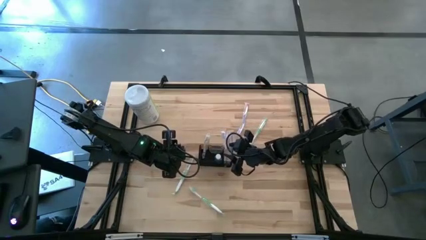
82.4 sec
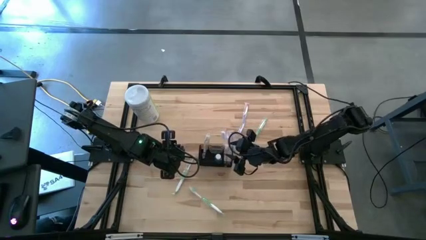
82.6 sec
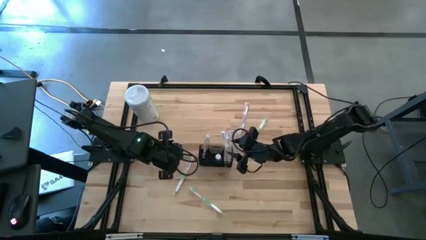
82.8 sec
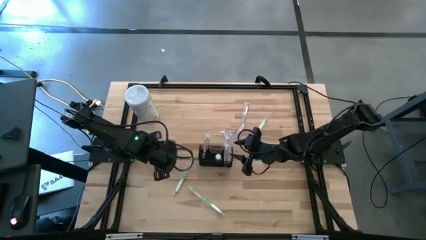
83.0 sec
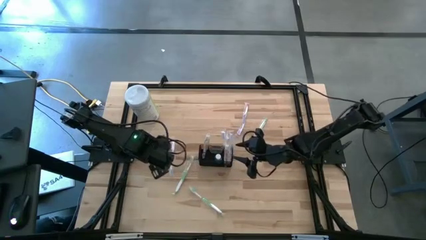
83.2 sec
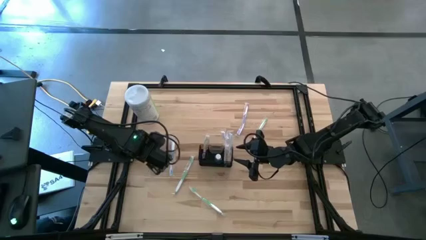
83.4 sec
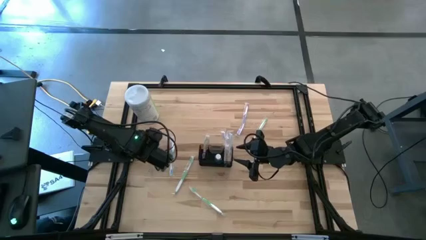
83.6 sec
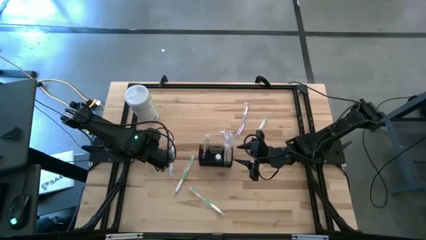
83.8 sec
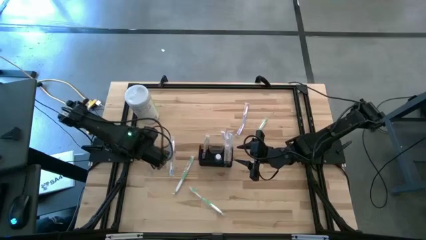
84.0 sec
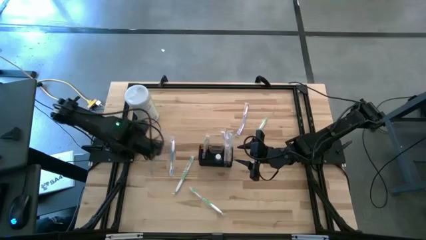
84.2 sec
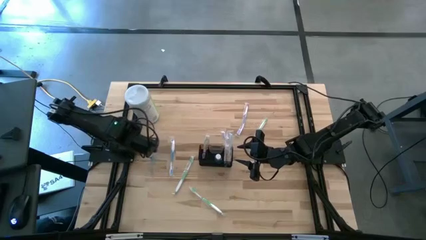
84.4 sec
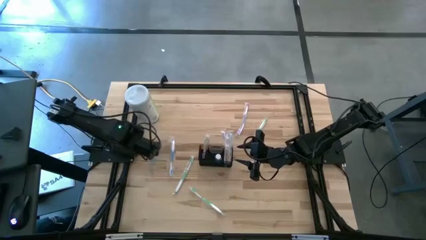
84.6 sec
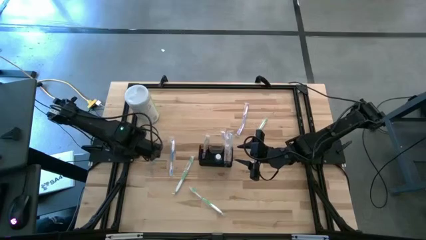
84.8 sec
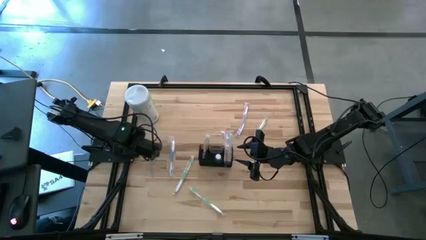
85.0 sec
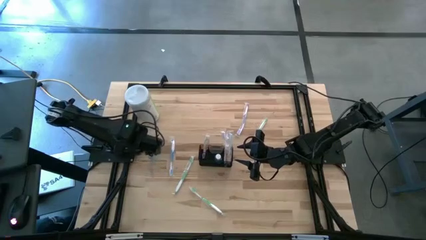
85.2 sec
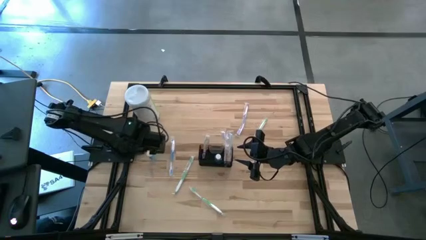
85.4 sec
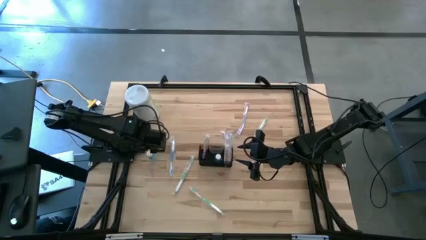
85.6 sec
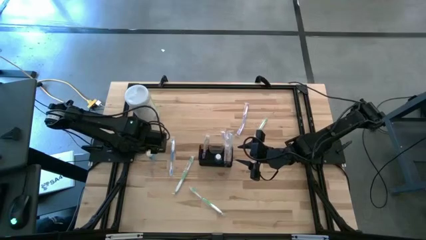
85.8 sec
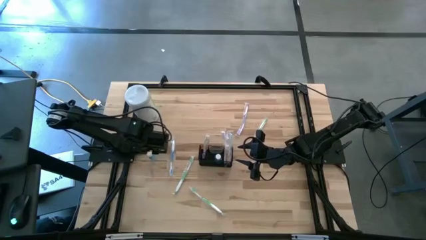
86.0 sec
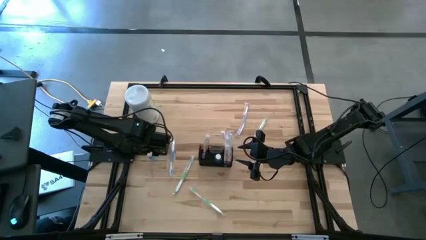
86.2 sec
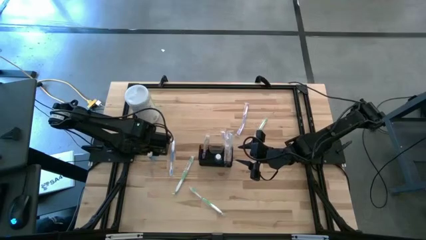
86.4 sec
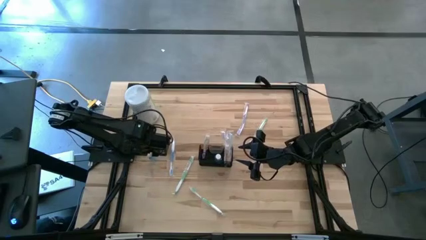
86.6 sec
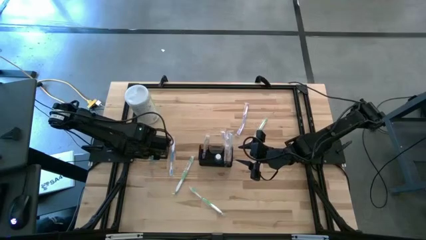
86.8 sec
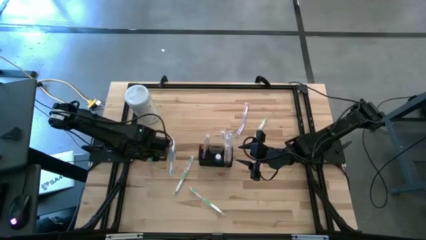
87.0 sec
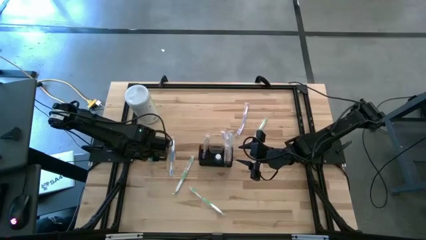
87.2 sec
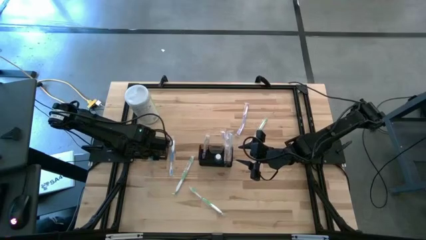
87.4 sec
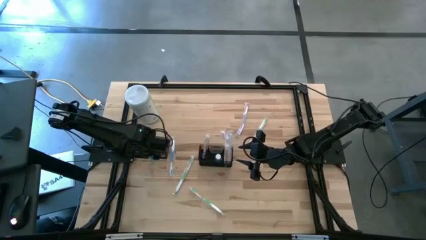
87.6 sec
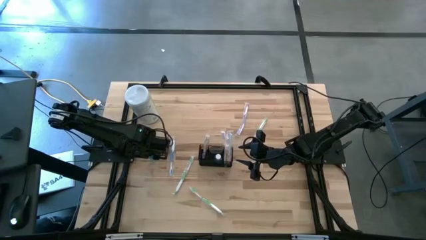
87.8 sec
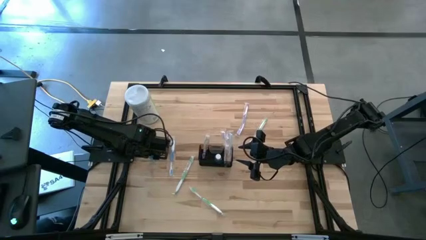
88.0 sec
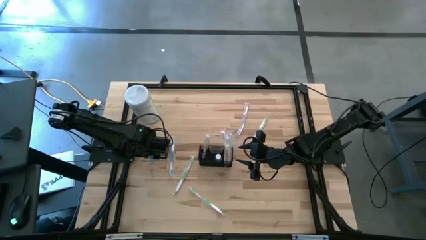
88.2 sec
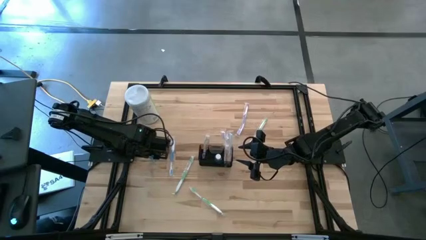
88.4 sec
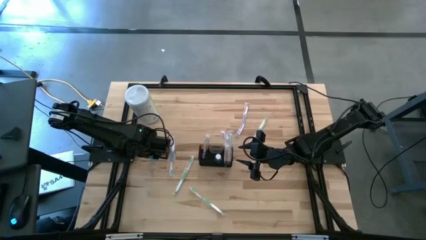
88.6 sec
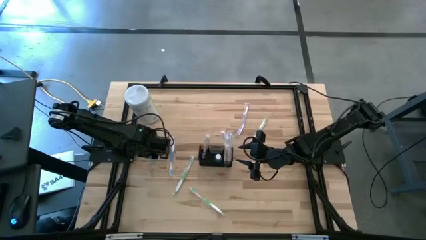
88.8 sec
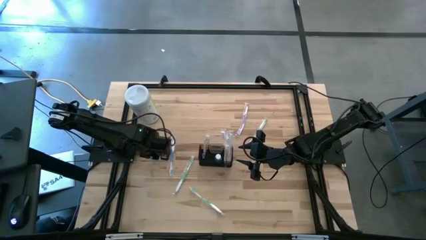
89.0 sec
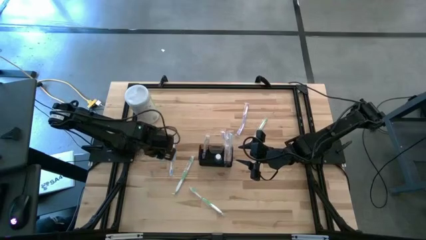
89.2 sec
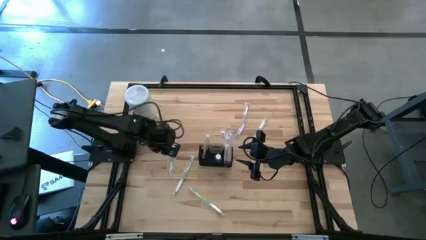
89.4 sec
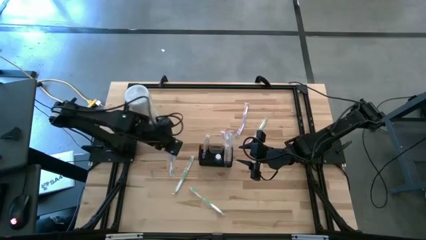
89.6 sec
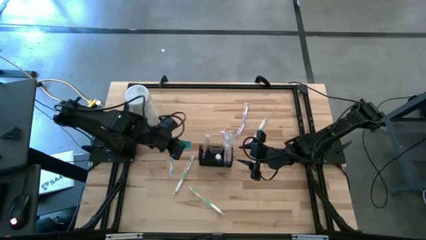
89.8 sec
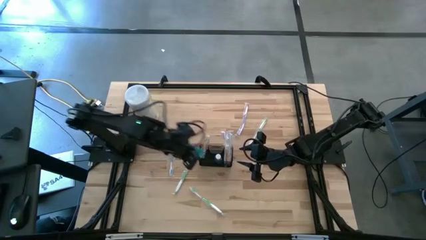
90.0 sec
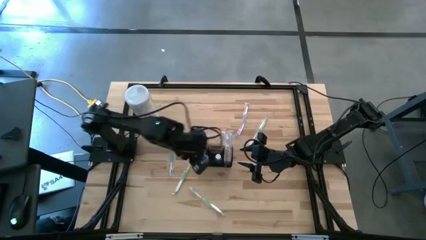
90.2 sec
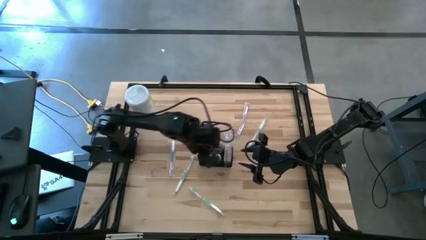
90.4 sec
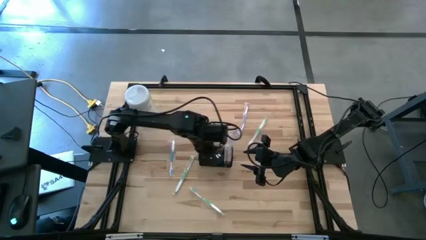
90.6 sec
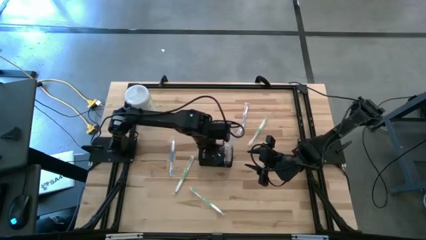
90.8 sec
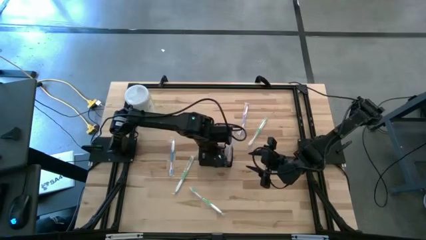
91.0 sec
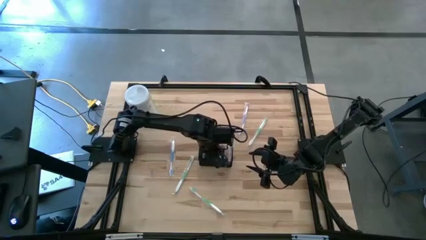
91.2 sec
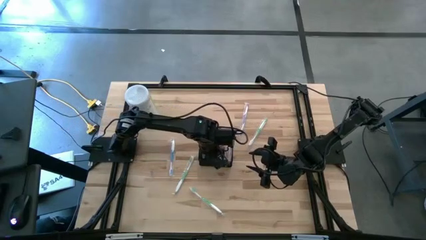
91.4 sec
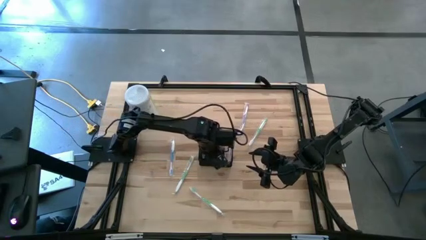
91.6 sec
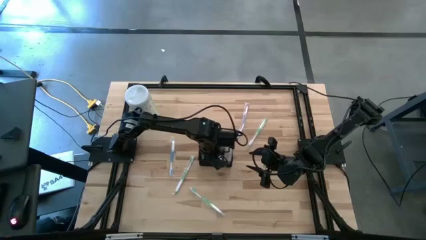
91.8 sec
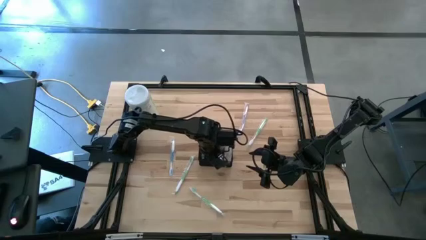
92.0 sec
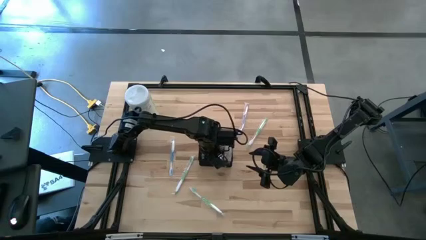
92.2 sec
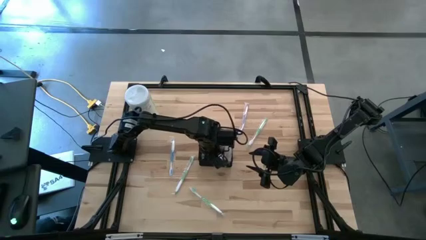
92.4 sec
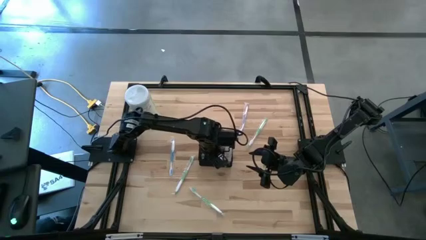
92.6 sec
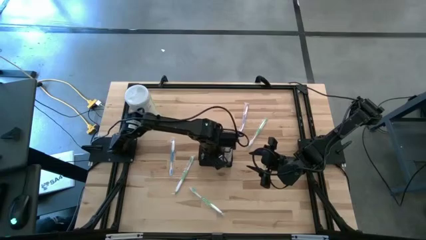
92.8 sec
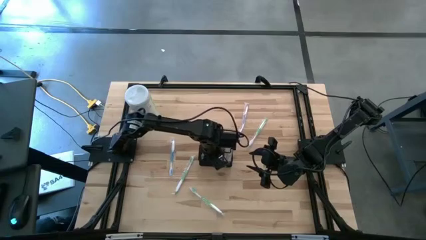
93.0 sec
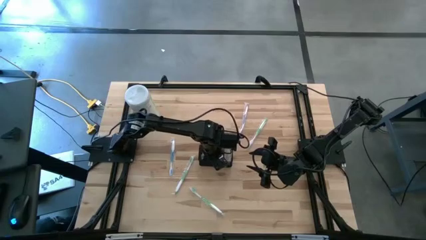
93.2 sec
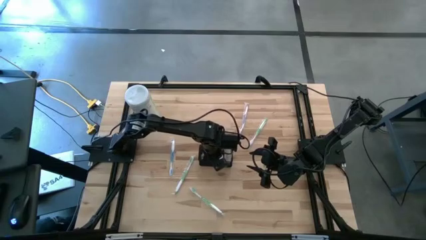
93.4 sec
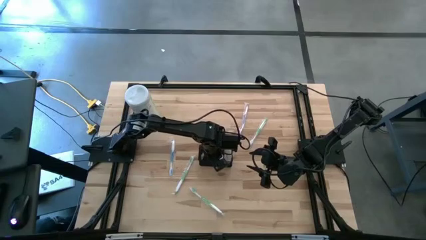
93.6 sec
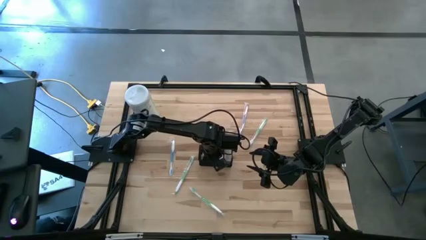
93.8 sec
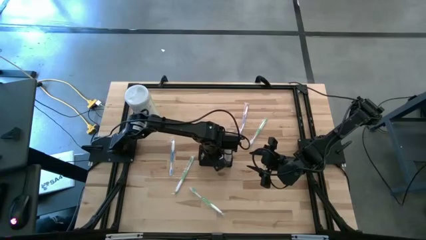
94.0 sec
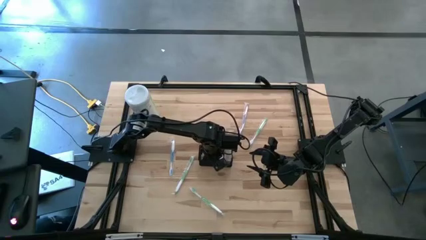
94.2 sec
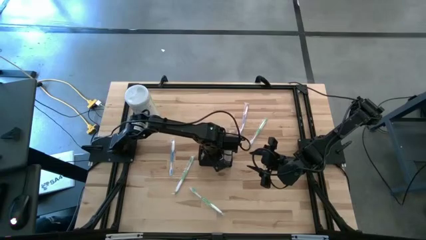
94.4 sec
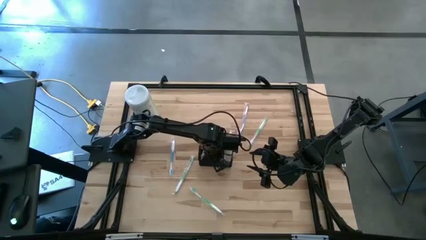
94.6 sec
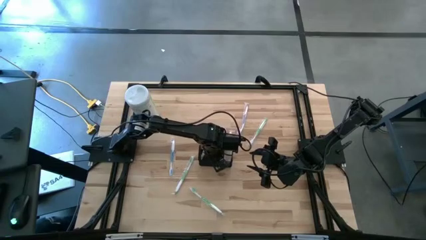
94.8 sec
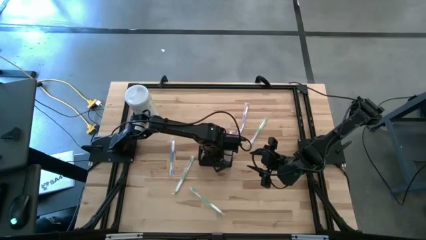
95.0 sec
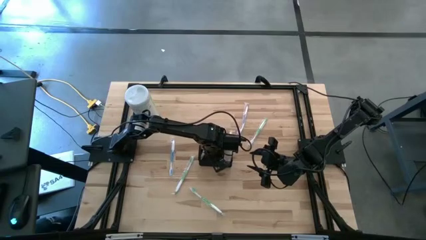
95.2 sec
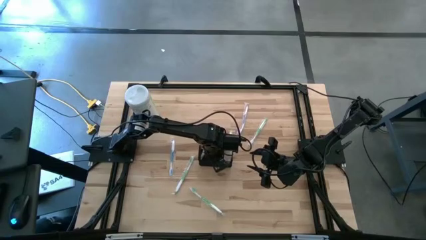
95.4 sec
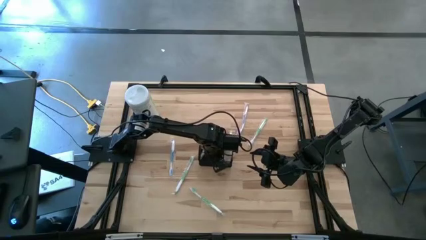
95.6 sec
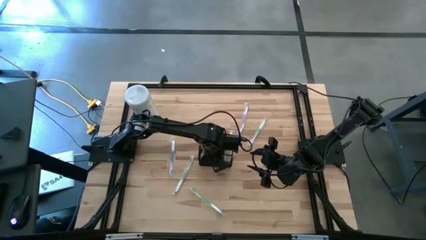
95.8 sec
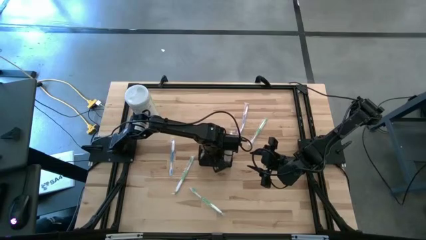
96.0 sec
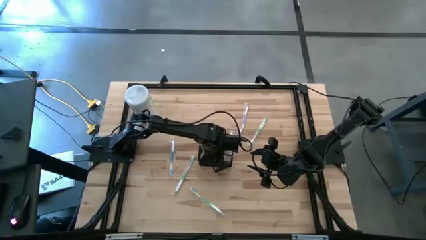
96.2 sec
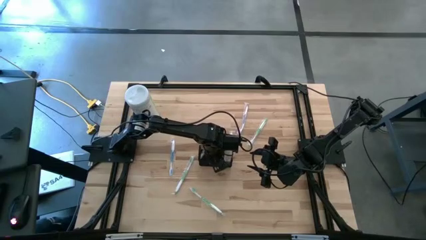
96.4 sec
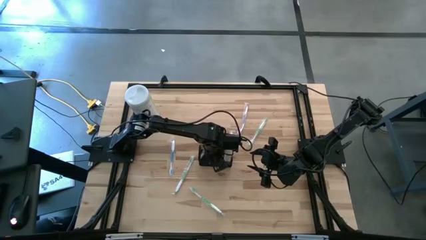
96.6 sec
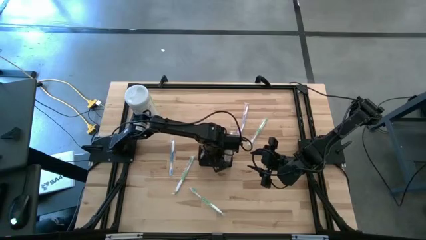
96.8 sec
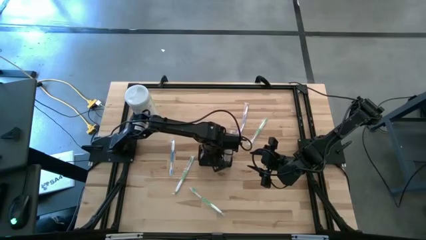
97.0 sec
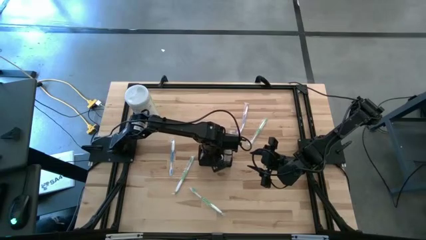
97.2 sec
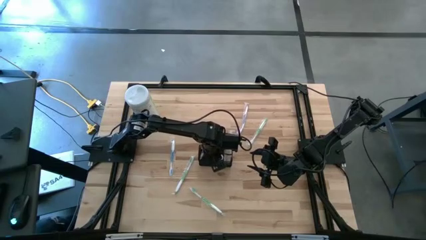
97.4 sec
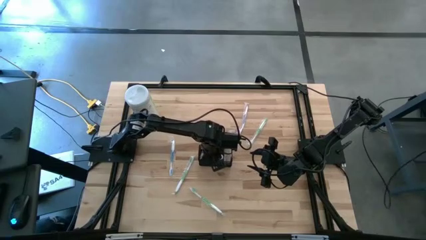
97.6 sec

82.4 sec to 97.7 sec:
Task: Pick & Place toothbrushing station
Put the blue mouthwash into the black mesh
